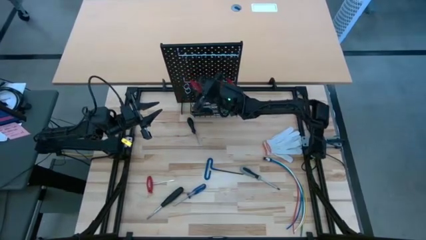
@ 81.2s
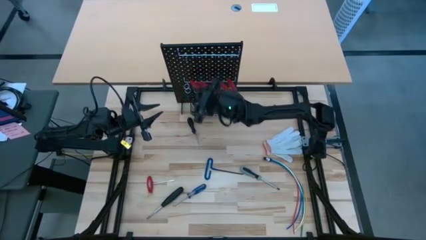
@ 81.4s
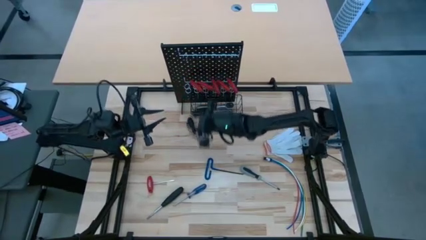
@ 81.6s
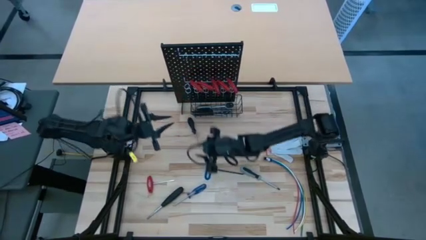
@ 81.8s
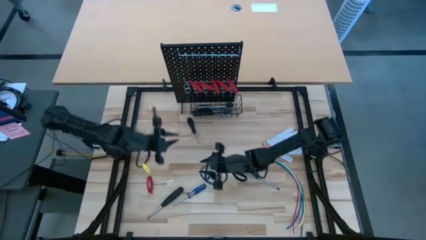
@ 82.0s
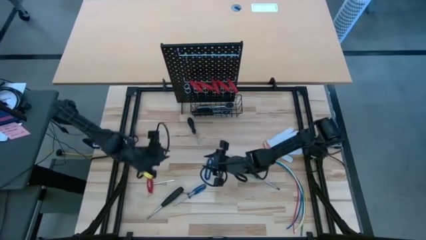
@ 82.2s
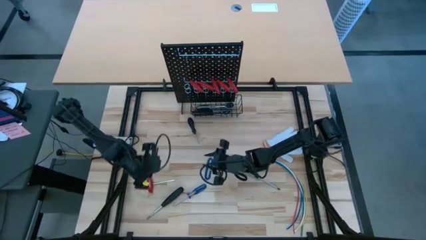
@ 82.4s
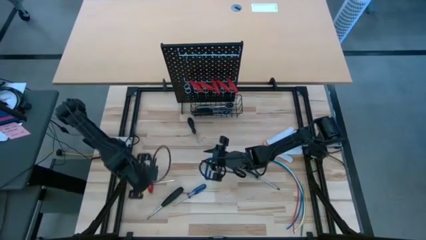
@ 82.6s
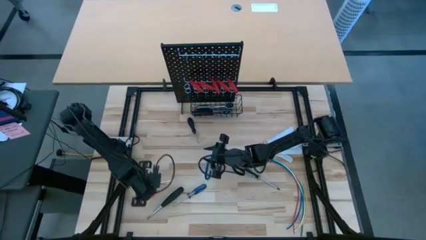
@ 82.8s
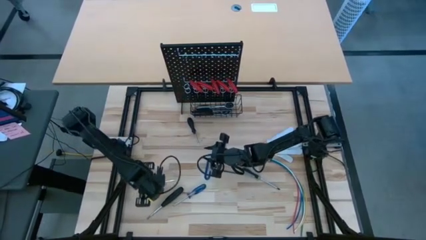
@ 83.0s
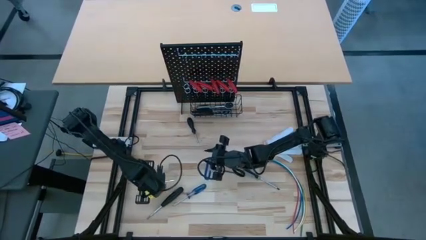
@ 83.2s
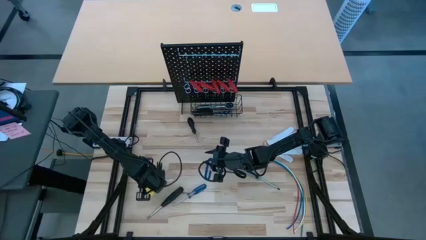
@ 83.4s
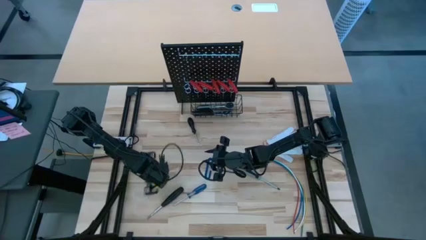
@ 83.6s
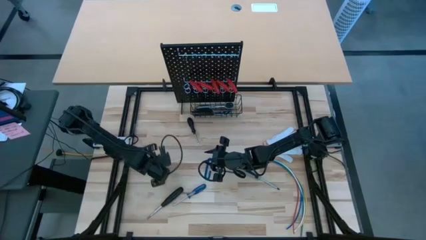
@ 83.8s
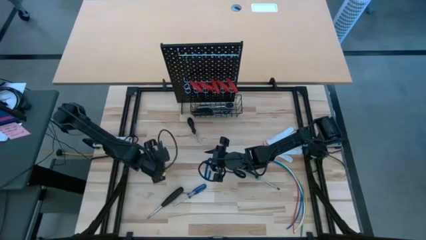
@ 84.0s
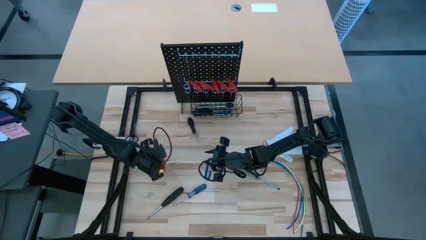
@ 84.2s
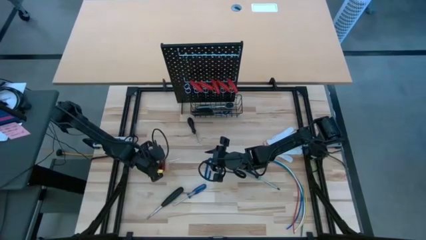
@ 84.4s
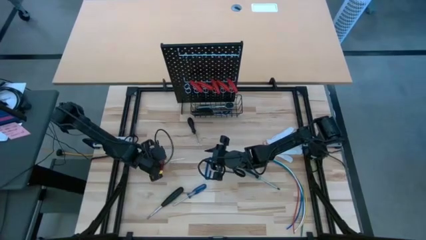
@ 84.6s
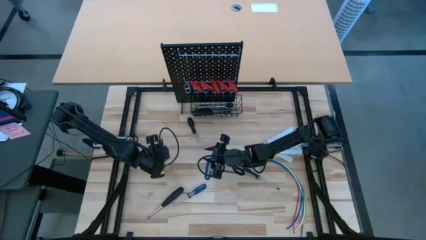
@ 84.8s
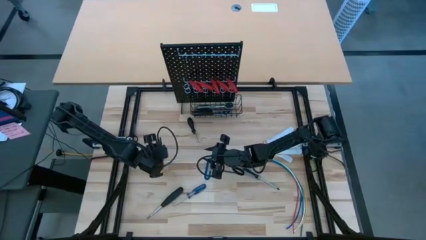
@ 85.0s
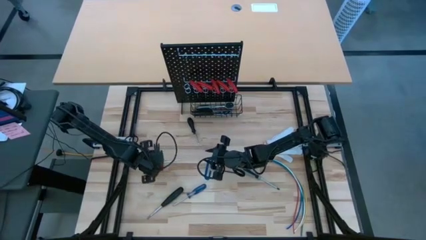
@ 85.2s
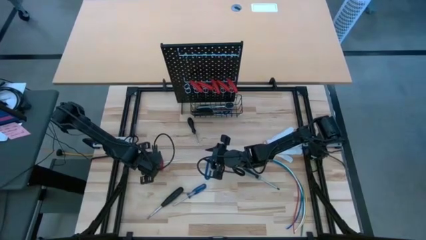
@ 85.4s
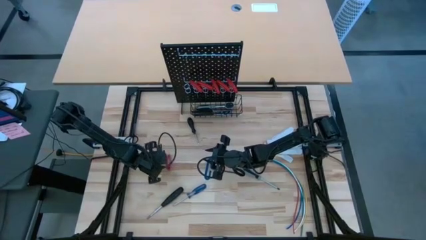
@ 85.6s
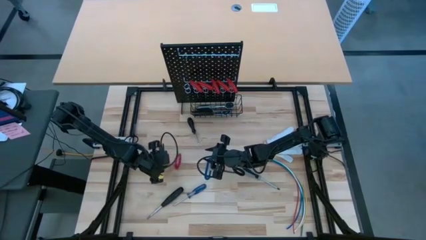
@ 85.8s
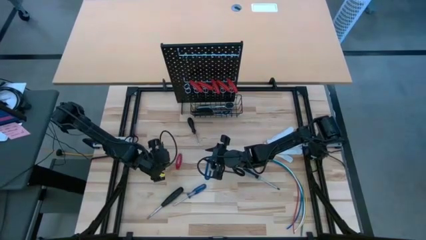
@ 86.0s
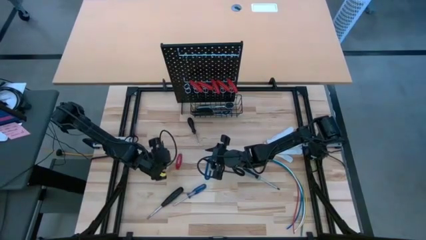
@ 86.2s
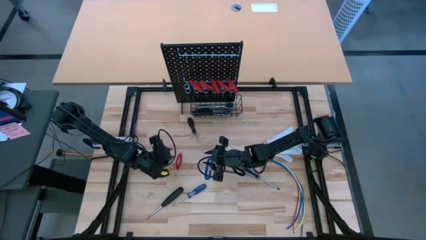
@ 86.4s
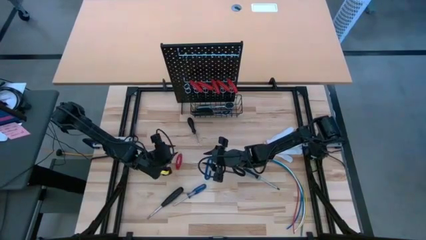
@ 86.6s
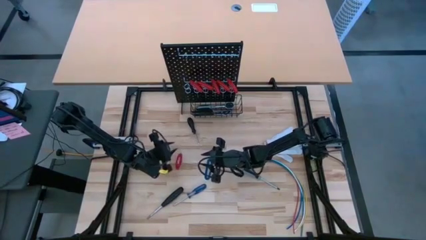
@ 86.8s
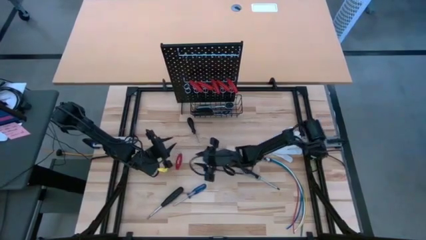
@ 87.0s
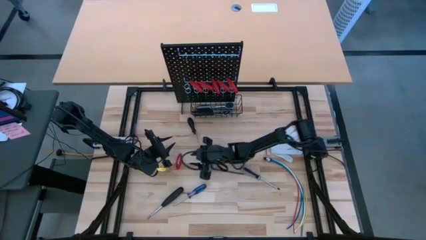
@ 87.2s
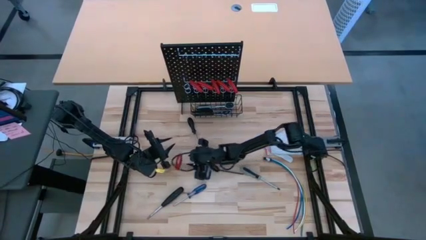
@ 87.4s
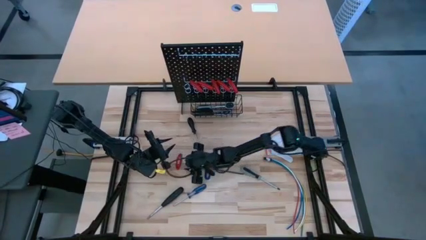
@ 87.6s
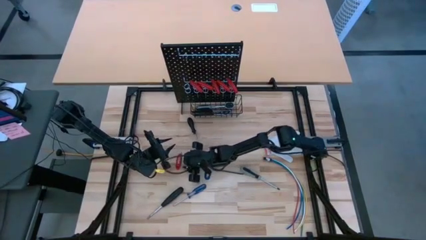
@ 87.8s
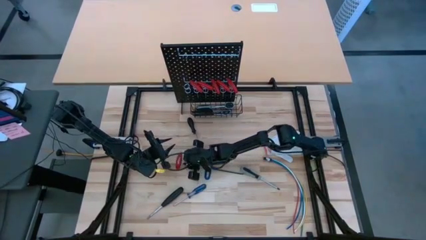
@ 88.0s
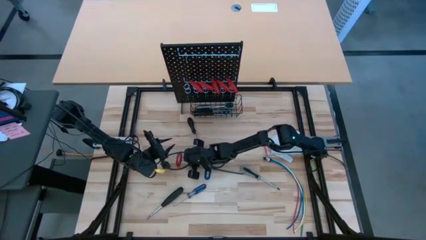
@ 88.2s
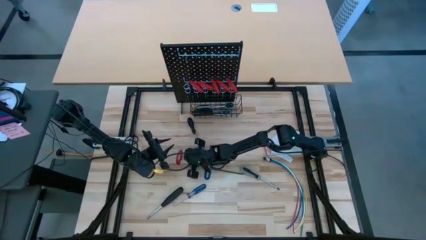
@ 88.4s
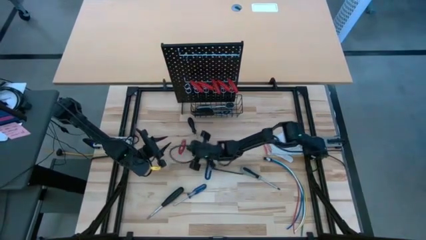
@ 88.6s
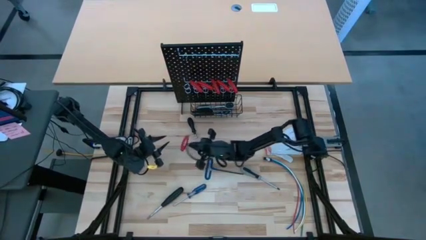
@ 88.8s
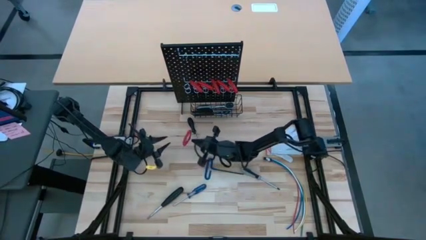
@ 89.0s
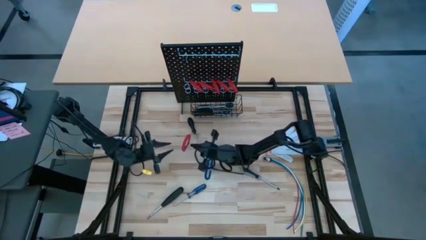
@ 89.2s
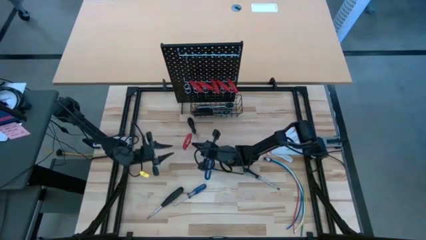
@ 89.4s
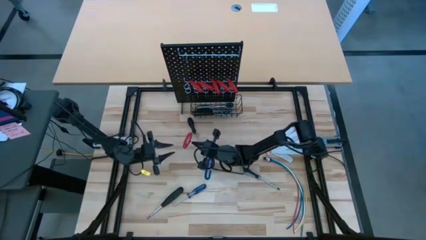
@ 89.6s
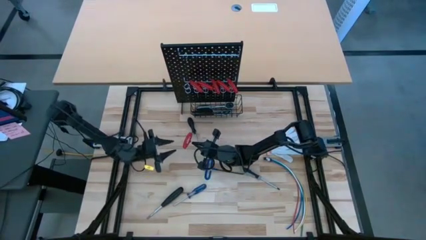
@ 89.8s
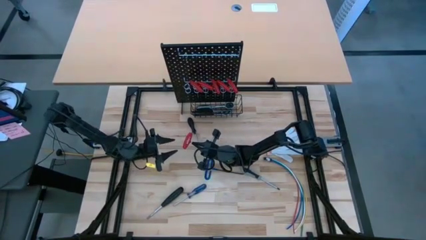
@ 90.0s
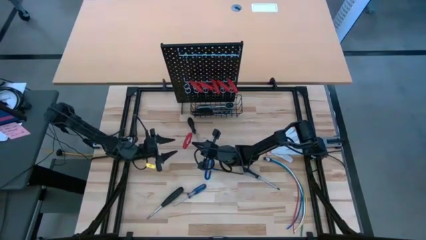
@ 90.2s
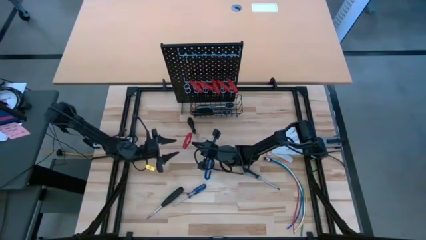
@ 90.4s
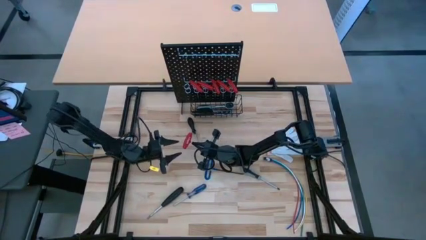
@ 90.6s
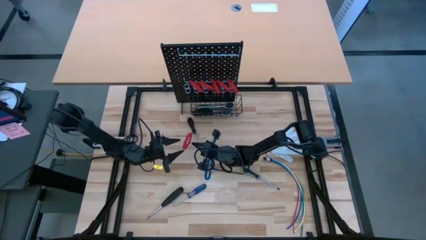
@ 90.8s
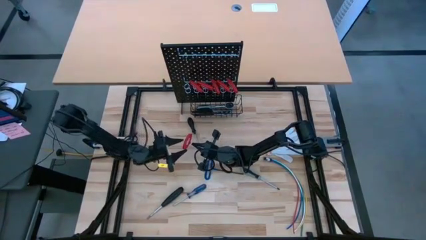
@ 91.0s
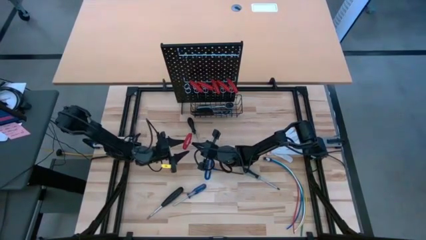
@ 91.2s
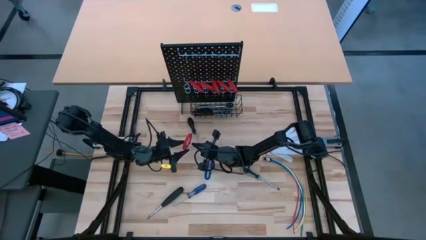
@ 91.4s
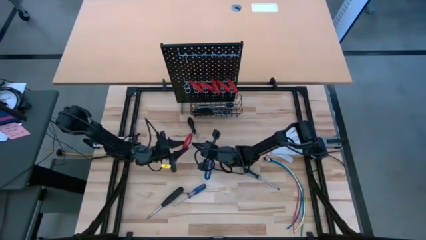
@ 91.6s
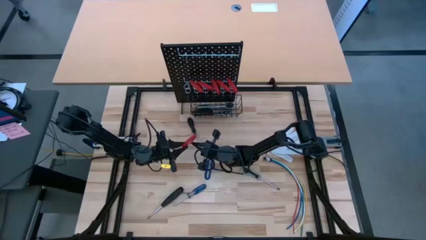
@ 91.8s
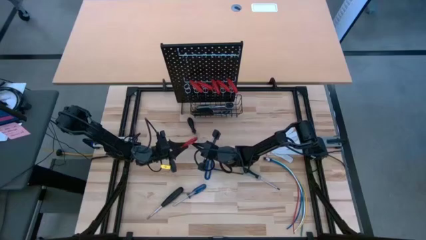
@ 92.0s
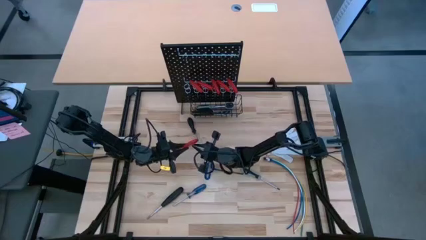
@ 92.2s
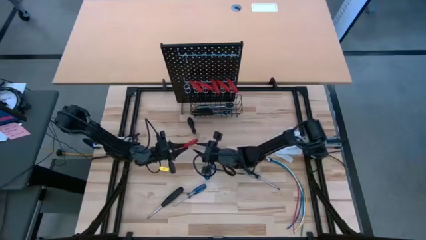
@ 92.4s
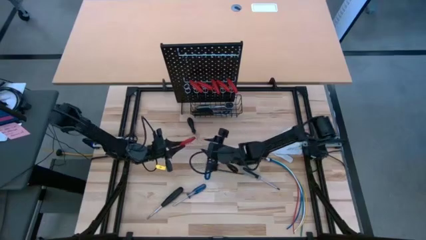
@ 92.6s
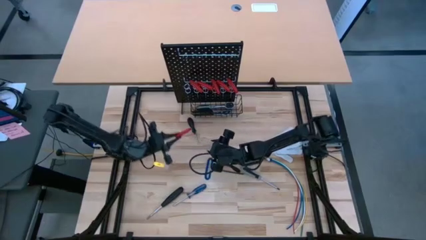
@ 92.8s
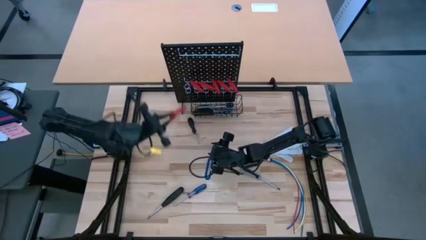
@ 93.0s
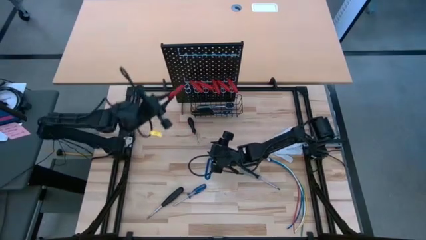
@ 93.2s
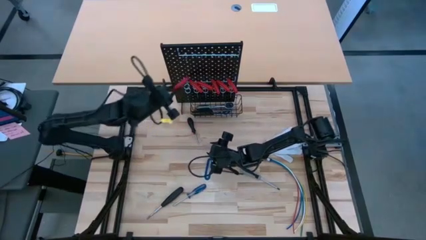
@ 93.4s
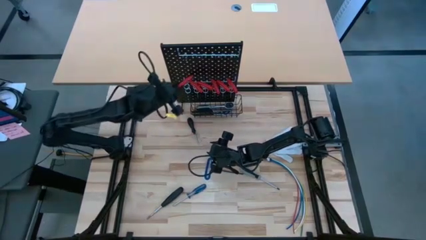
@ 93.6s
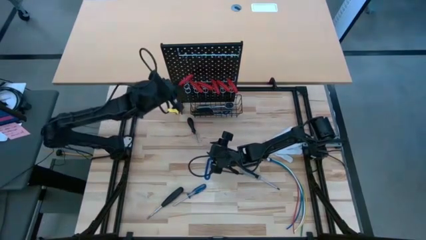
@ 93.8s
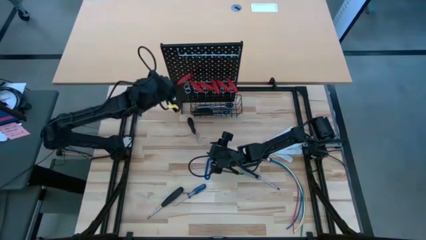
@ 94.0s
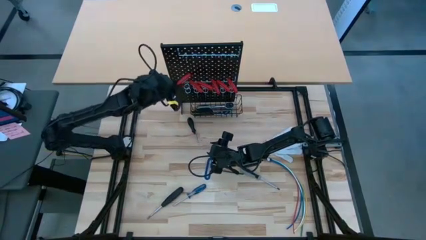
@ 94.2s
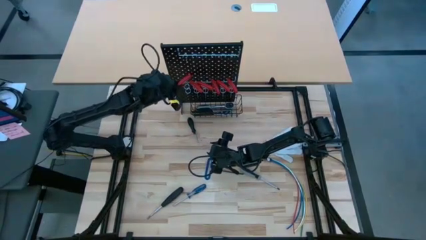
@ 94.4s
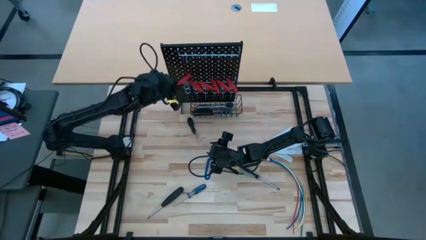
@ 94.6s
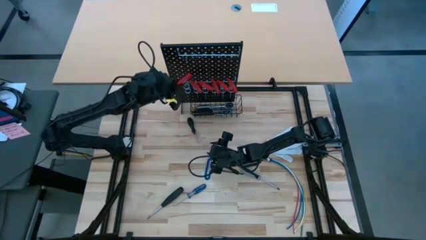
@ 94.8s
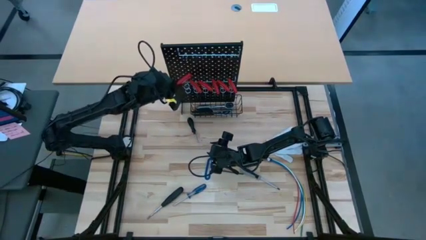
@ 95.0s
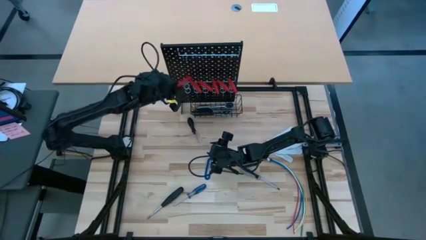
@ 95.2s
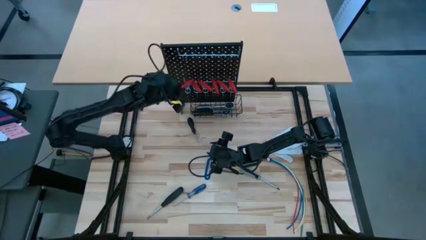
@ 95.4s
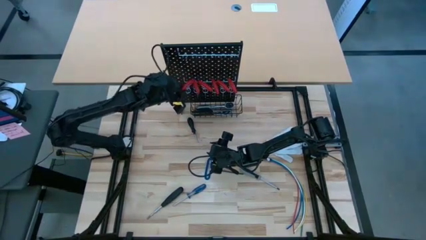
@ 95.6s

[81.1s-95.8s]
Task: Hang tools onto peg board
Hang the red Allen wrench on the pegboard
